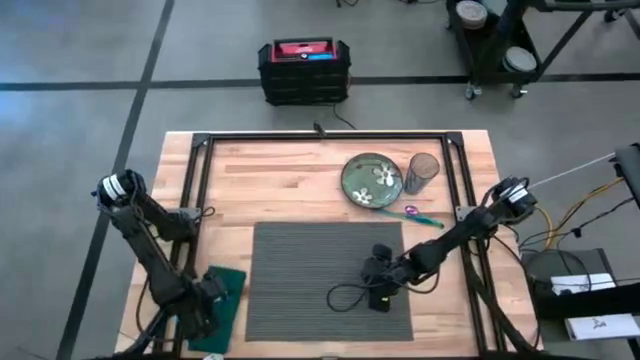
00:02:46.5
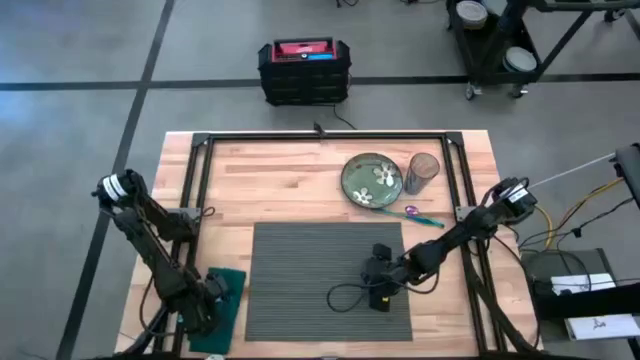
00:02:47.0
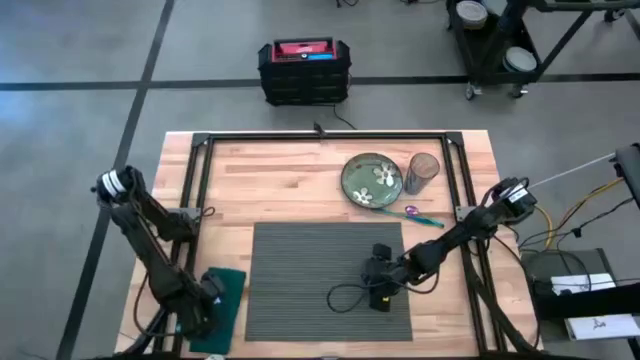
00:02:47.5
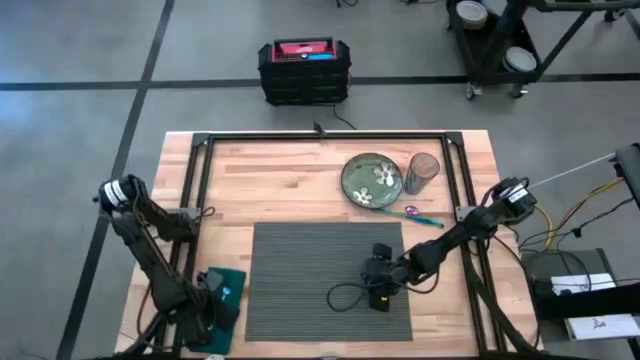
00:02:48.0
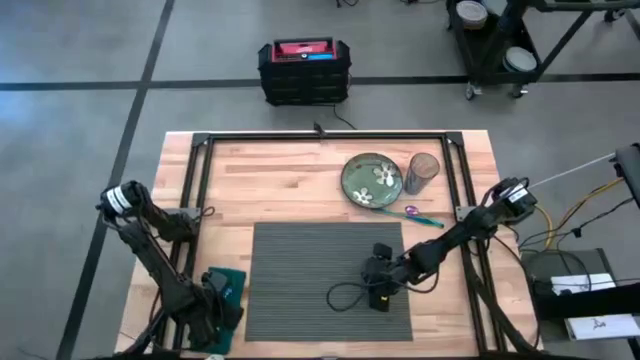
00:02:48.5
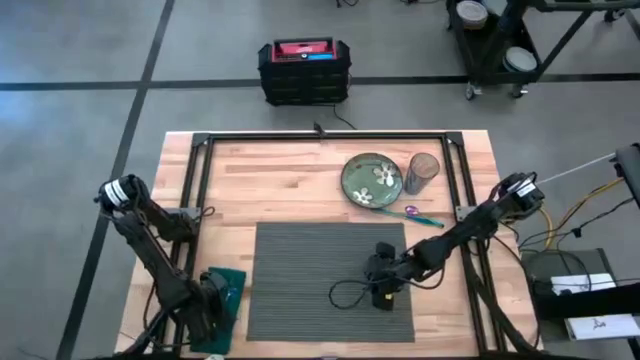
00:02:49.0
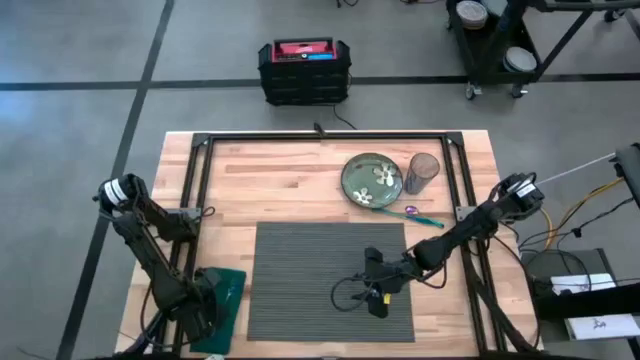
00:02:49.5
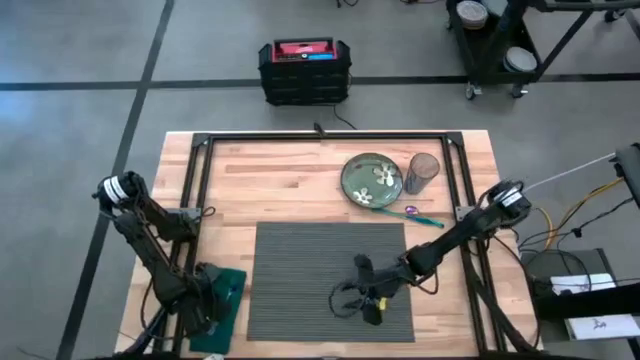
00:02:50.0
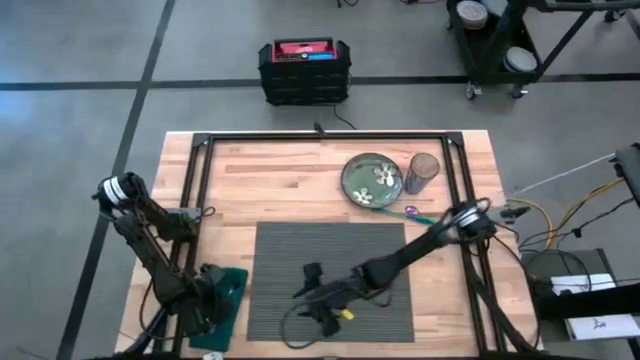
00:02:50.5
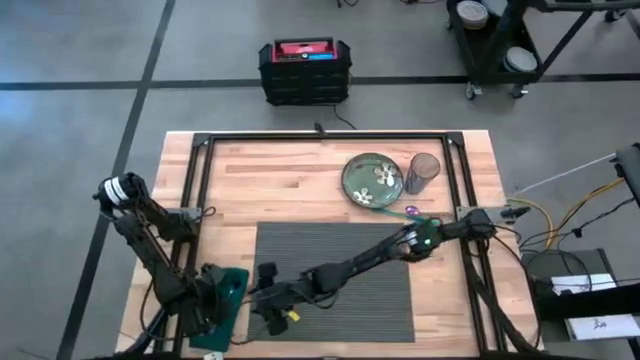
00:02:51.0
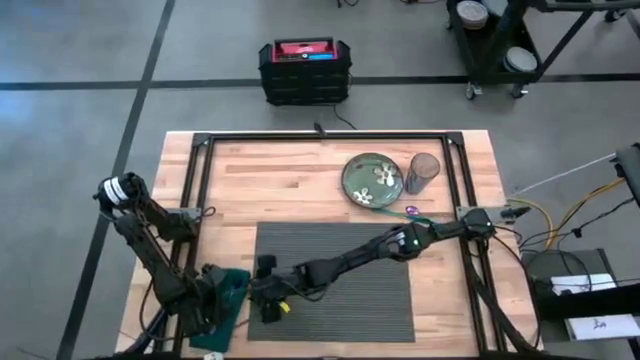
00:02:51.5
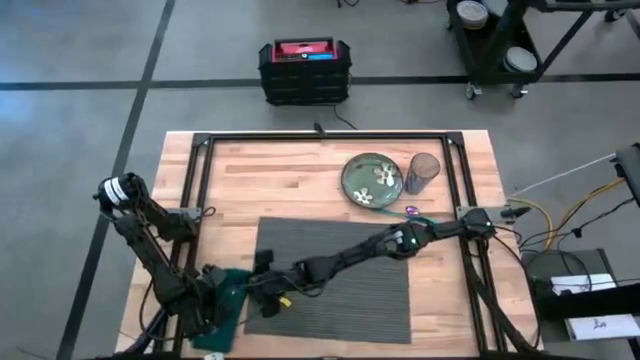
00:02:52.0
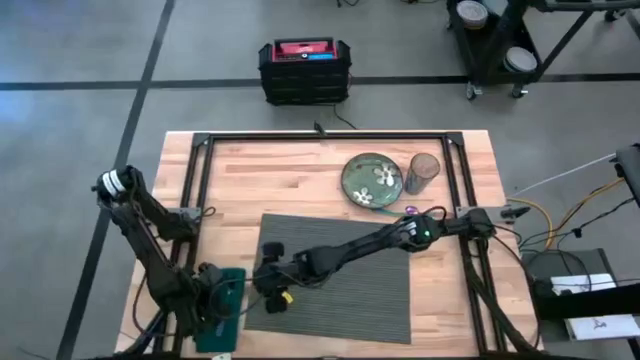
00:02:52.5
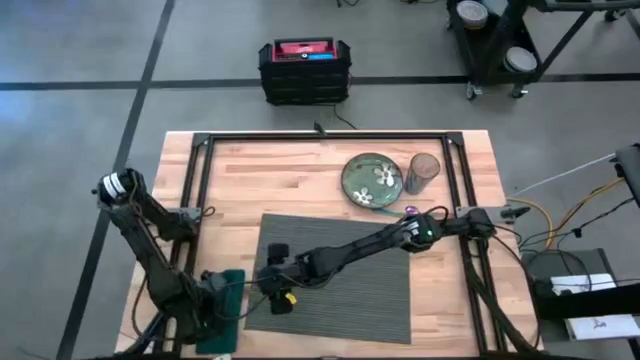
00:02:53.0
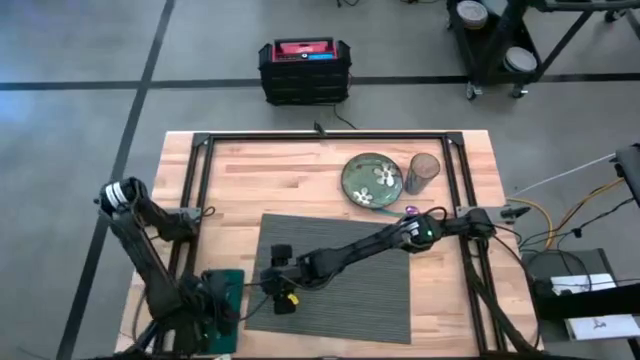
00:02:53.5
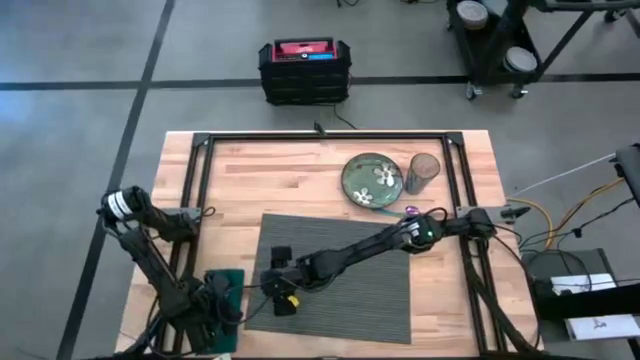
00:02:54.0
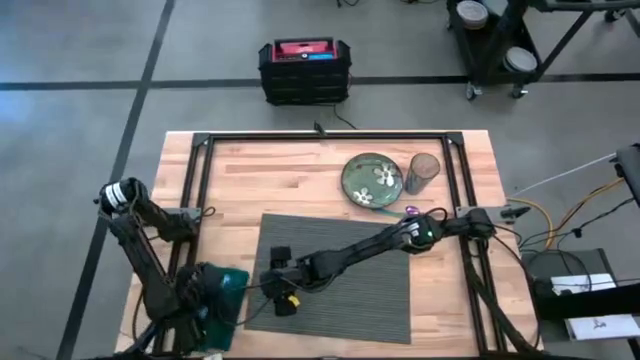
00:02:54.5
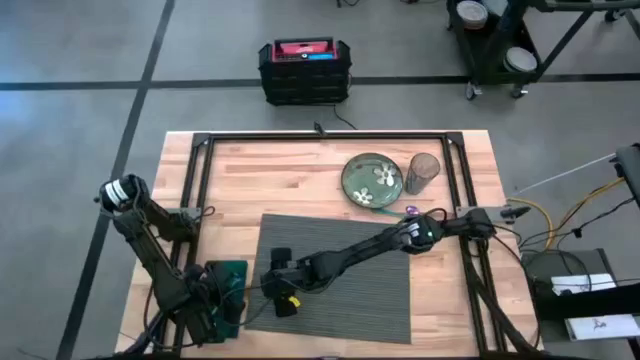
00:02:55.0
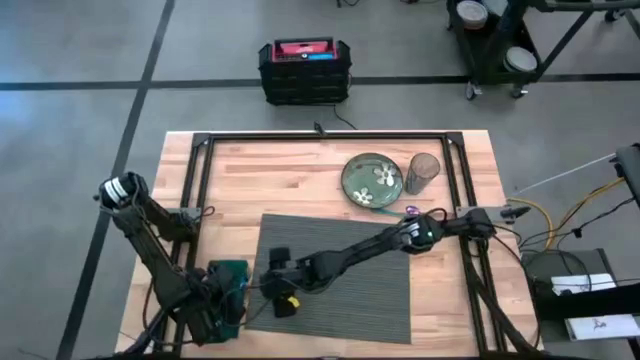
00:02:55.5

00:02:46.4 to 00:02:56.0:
Task: Set table place
Put the green napkin and the iridescent blue fork on the place mat

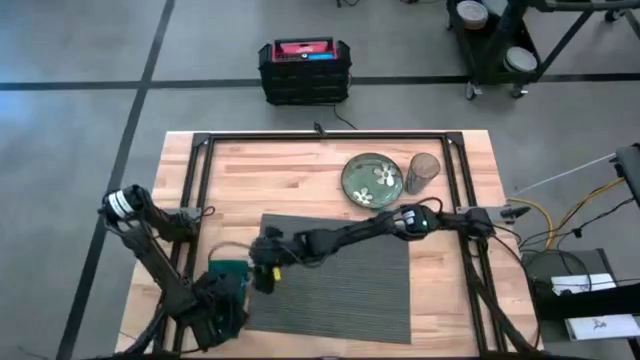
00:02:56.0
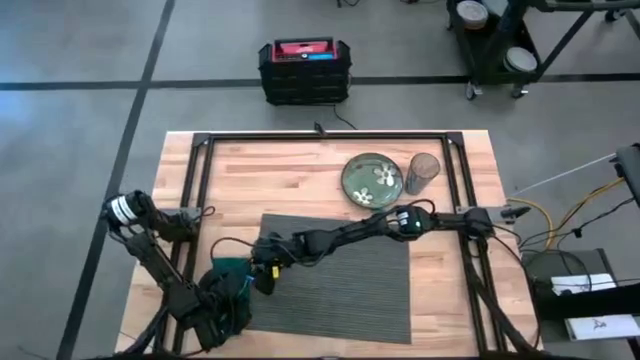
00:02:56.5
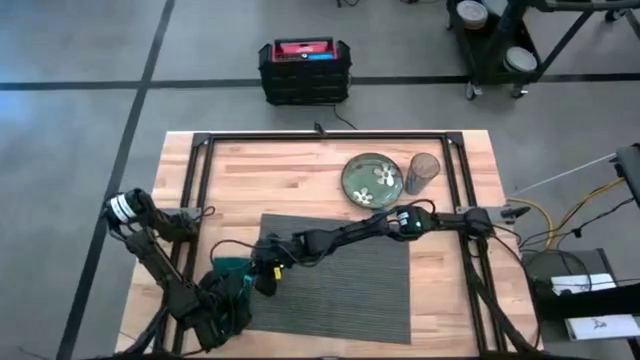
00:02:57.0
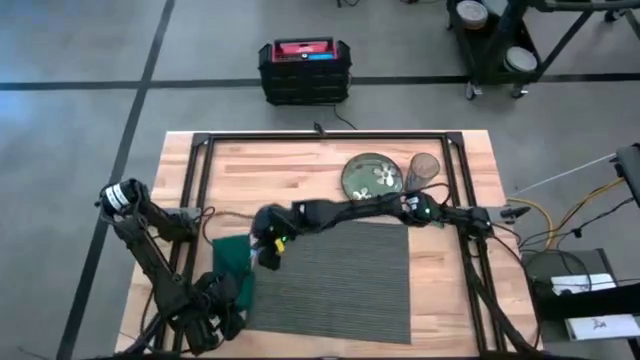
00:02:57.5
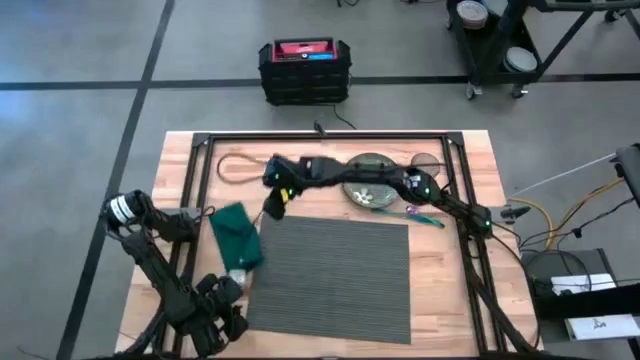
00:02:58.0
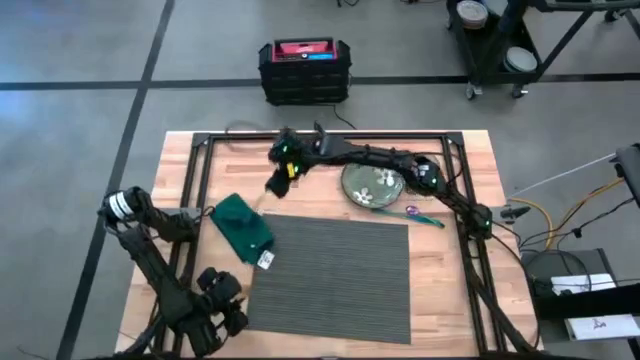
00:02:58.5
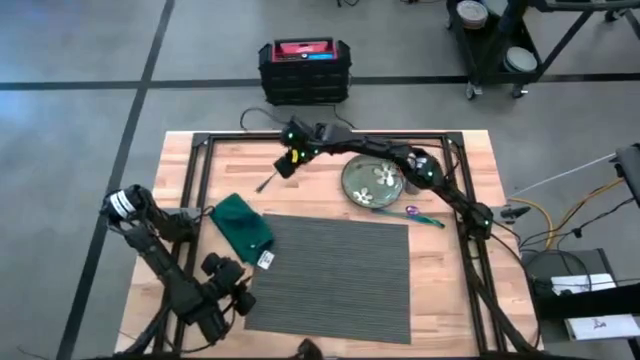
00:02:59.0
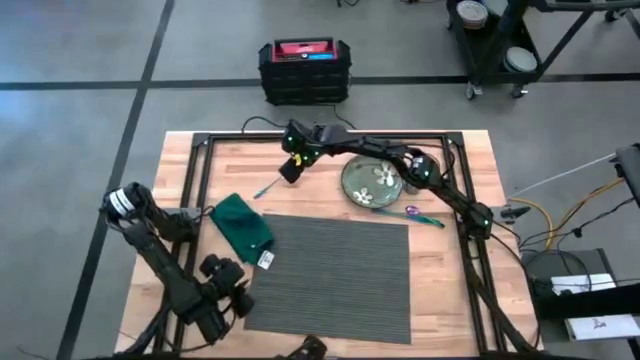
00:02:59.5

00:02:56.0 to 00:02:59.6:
Move the the iridescent blue fork to the top right of the table

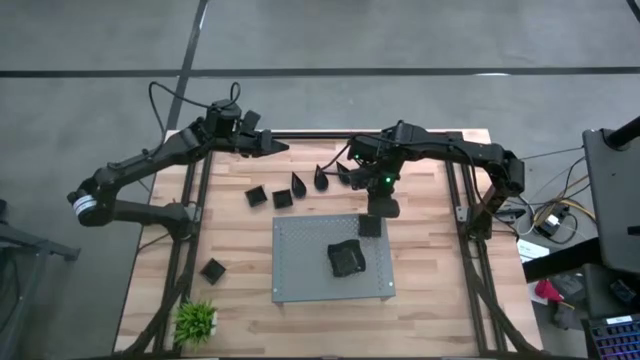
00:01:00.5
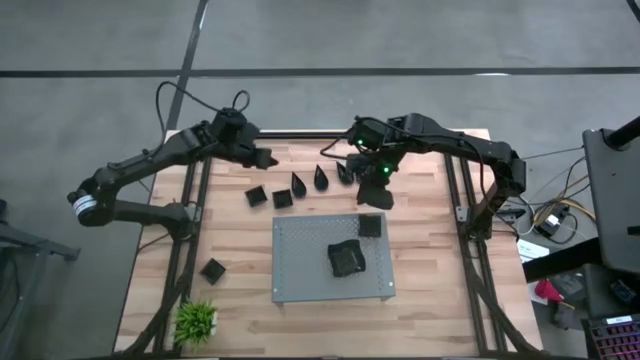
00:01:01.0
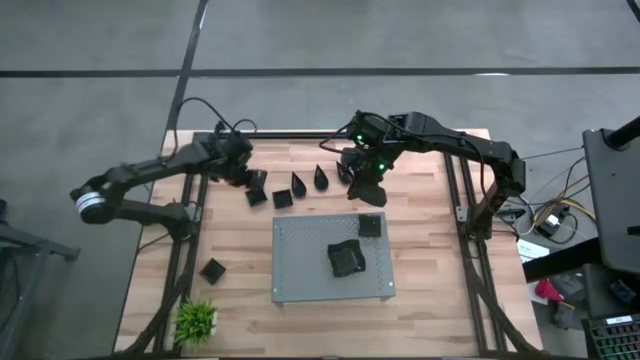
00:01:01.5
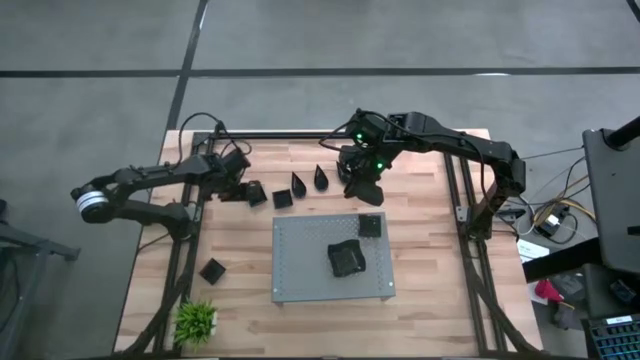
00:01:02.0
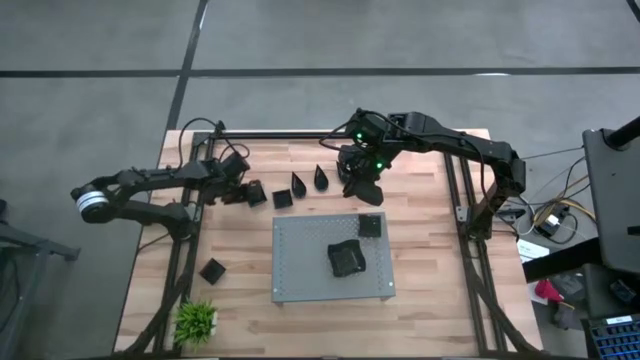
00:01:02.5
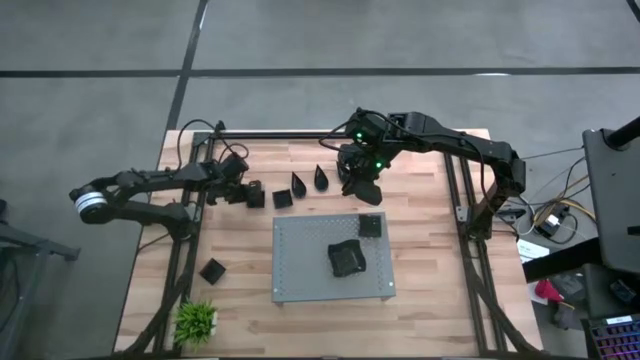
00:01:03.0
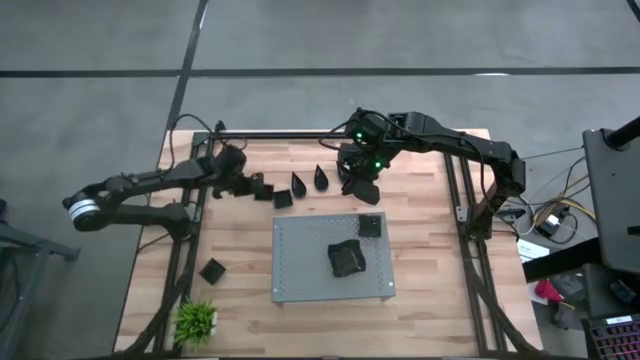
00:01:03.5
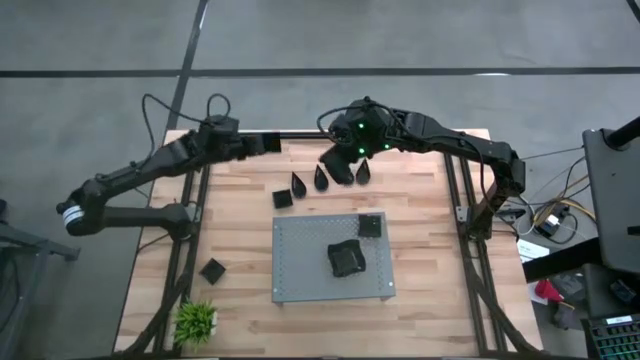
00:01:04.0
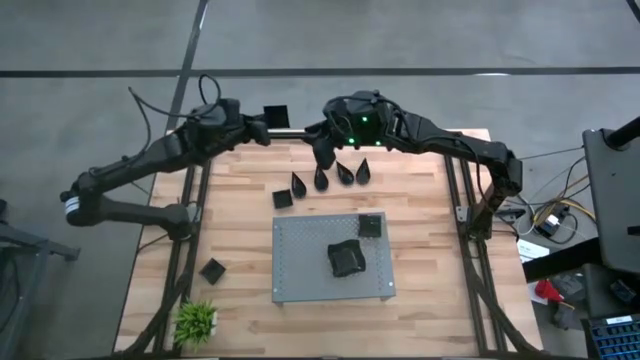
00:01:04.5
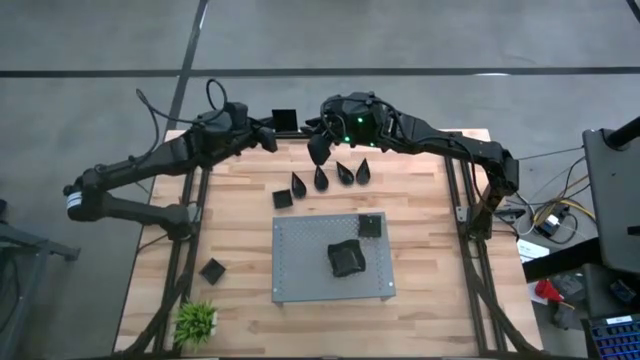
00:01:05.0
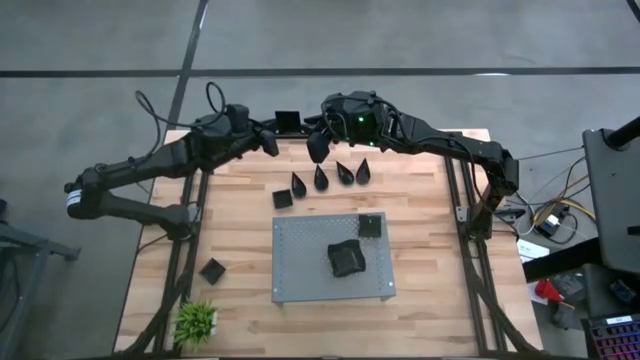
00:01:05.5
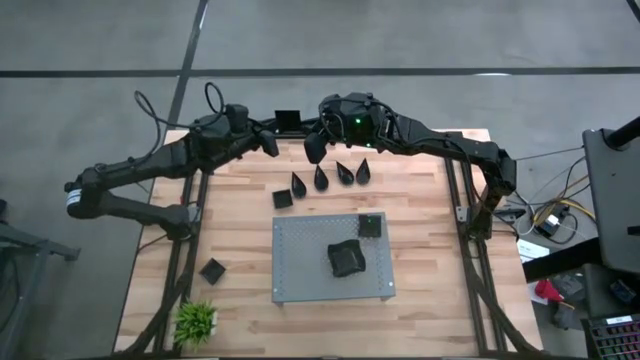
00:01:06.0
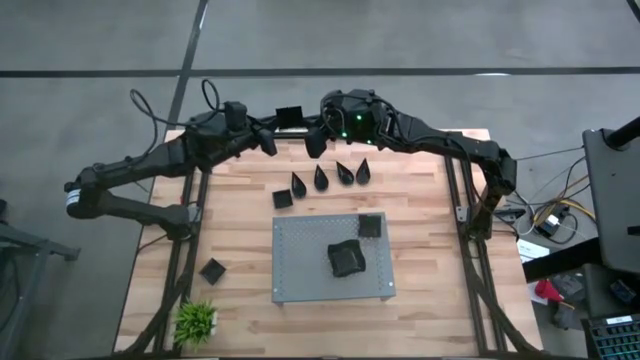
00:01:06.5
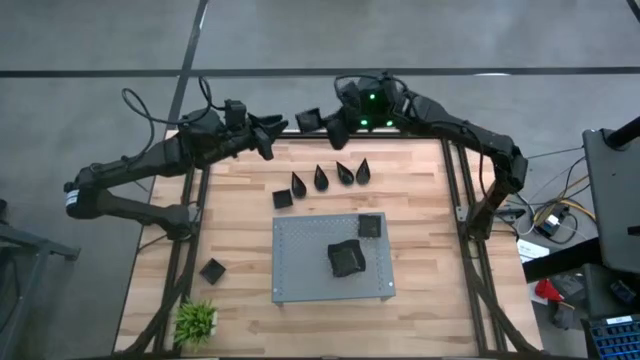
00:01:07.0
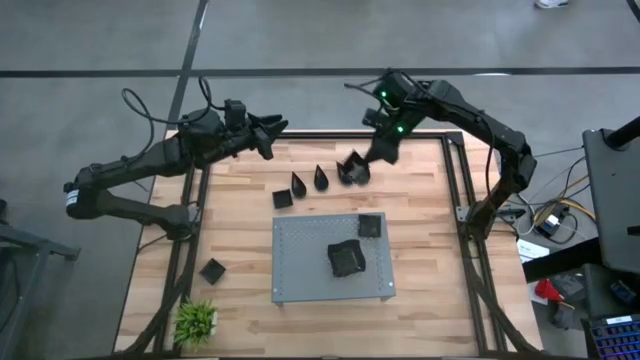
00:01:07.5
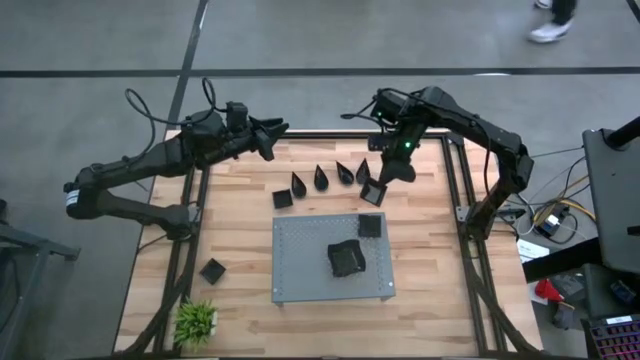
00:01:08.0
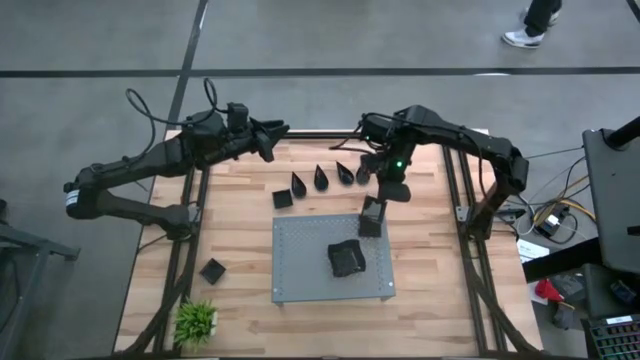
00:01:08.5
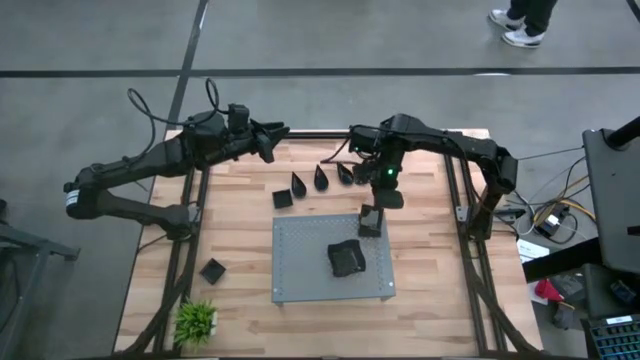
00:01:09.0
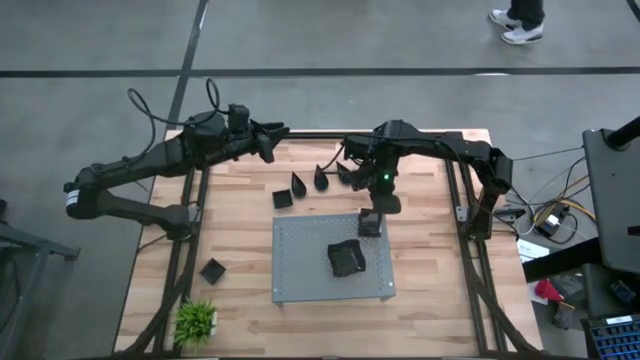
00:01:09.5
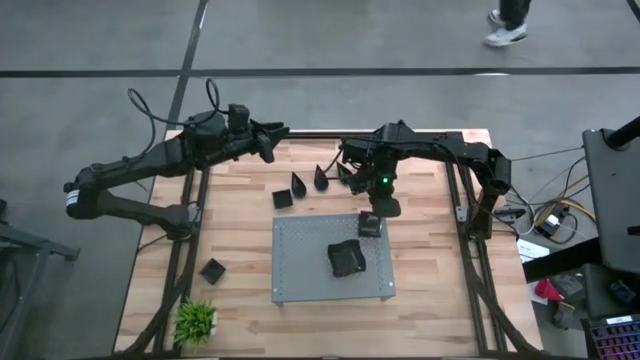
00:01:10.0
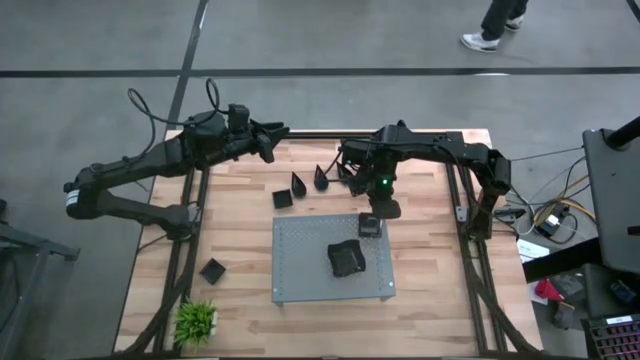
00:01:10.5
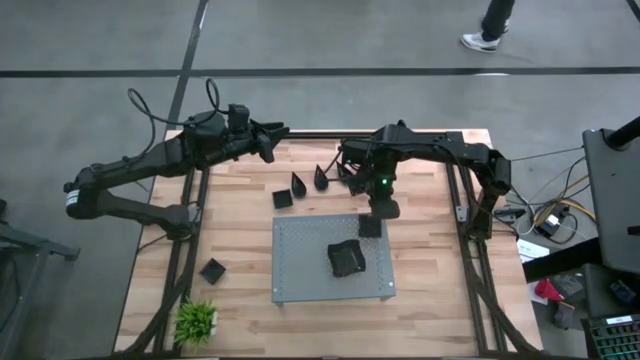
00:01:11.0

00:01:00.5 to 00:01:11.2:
Task: Pick & Place Mini shaped plates
Stack the square plate on top of the other square plates on the shelf
